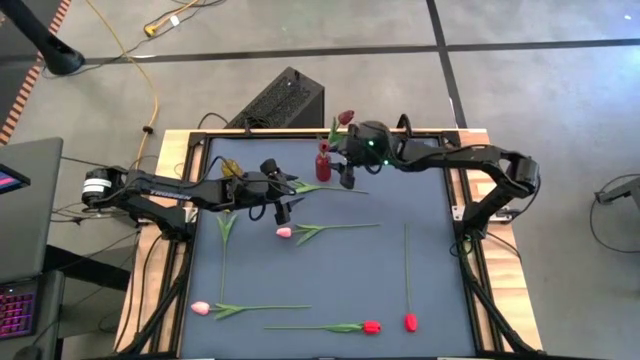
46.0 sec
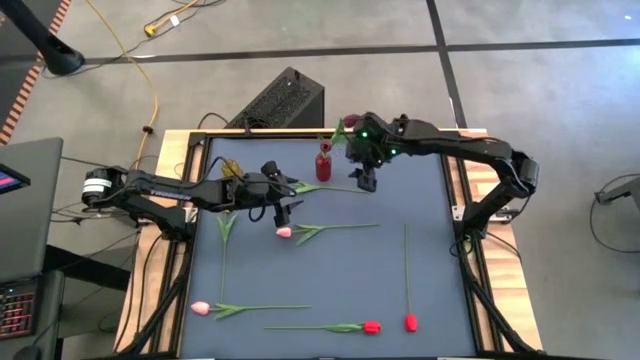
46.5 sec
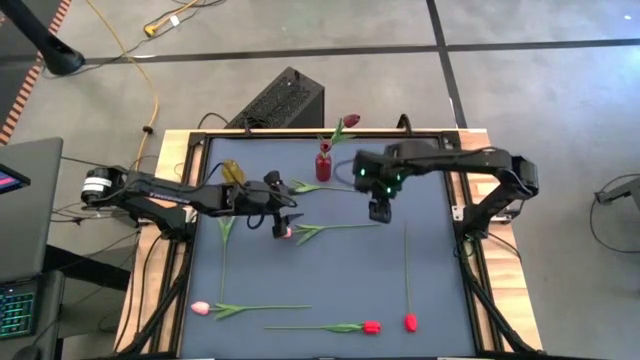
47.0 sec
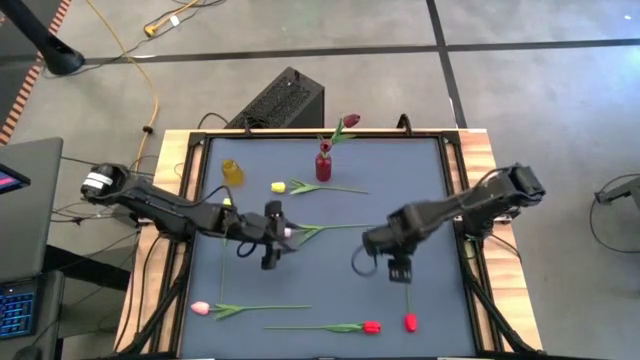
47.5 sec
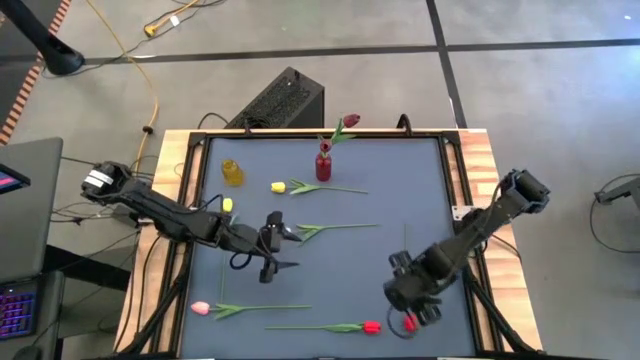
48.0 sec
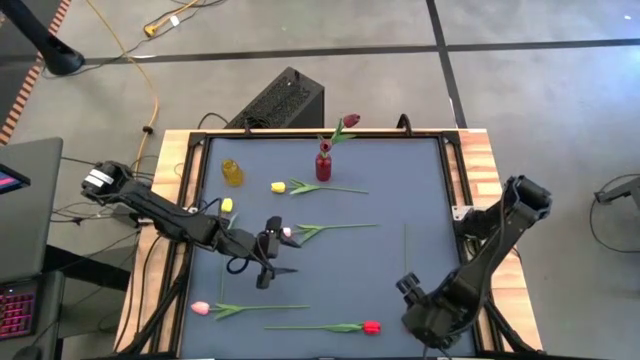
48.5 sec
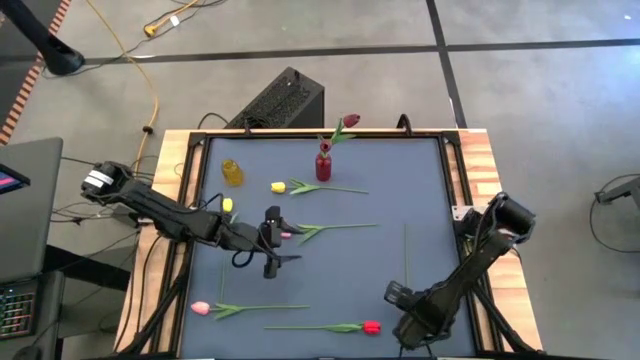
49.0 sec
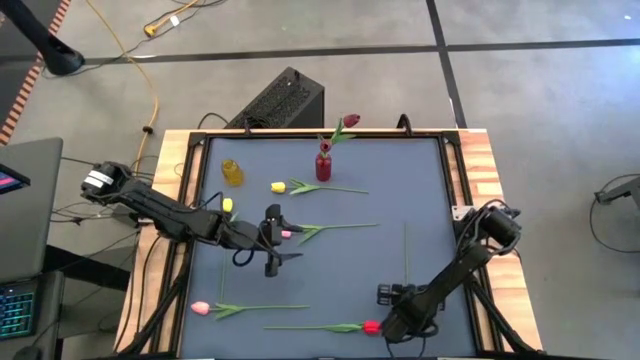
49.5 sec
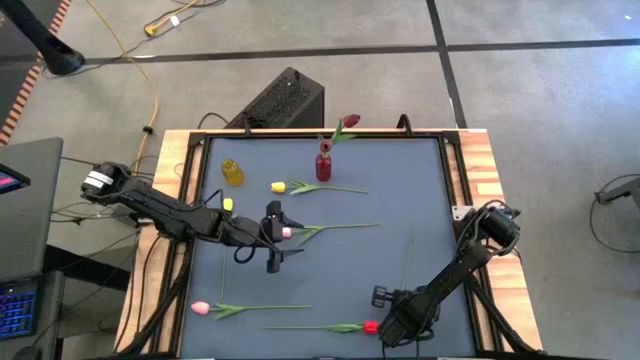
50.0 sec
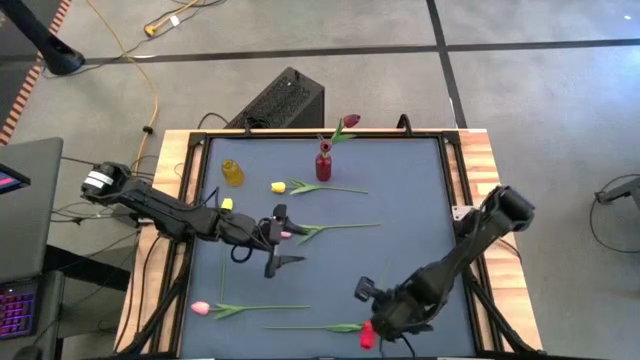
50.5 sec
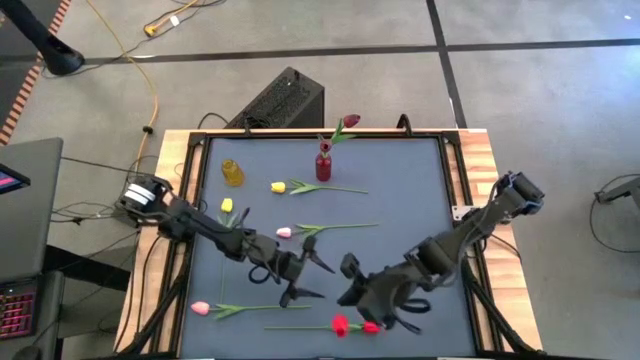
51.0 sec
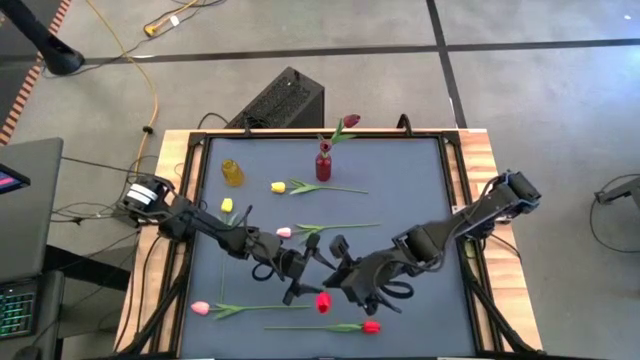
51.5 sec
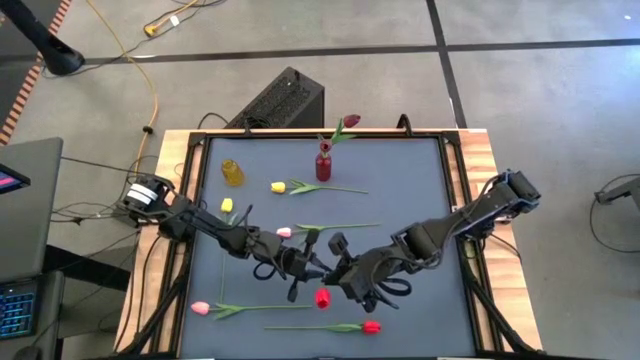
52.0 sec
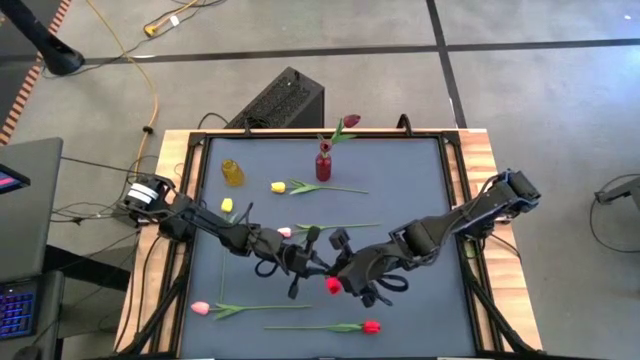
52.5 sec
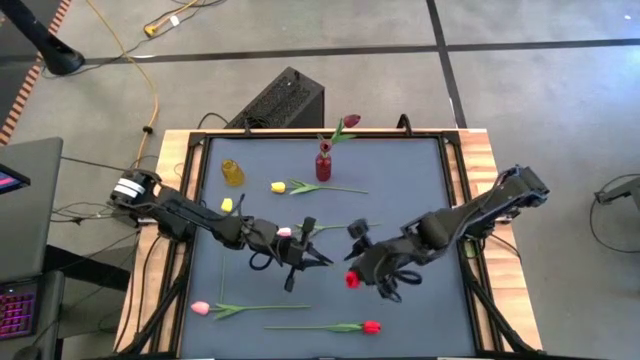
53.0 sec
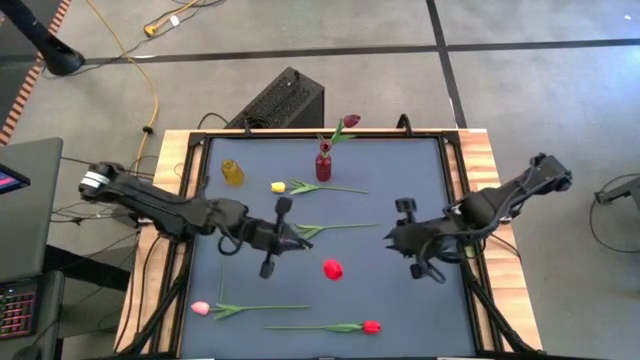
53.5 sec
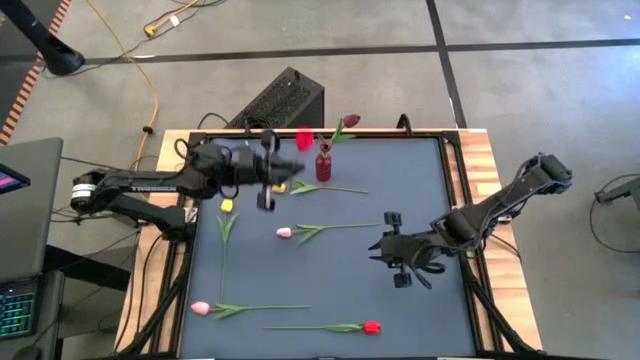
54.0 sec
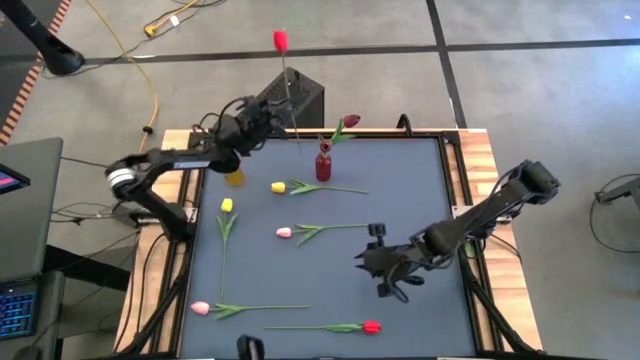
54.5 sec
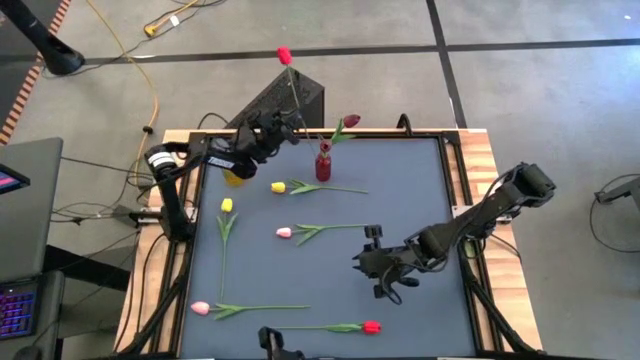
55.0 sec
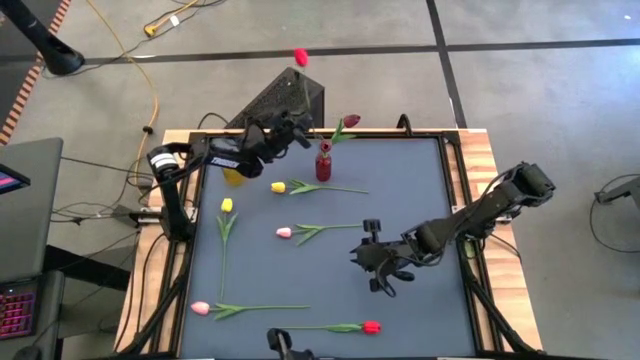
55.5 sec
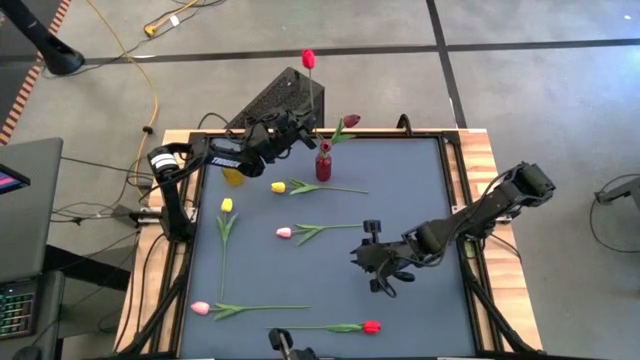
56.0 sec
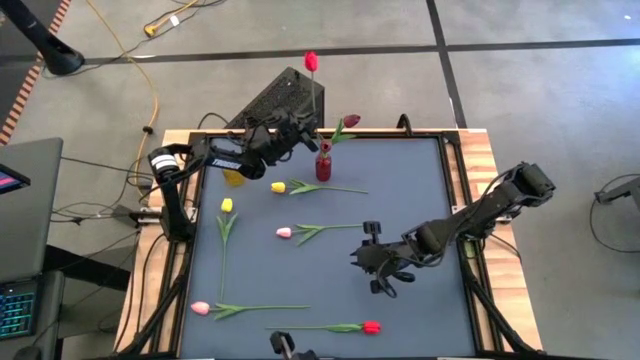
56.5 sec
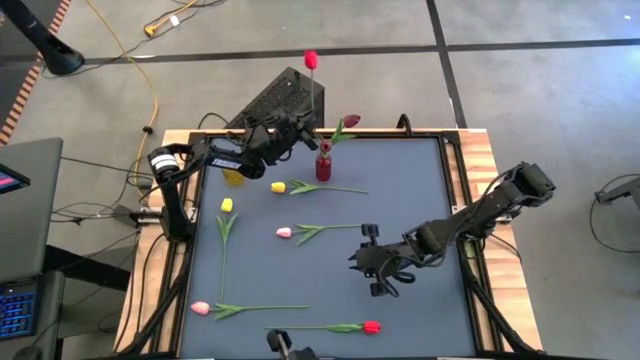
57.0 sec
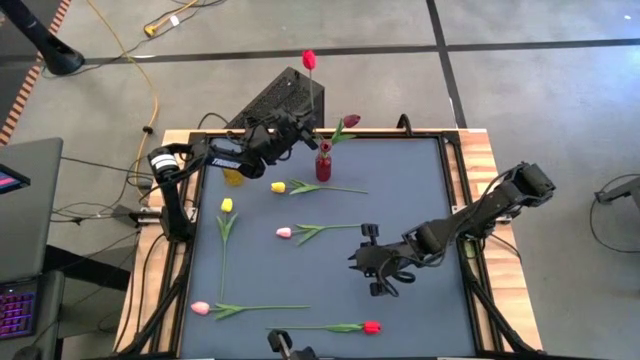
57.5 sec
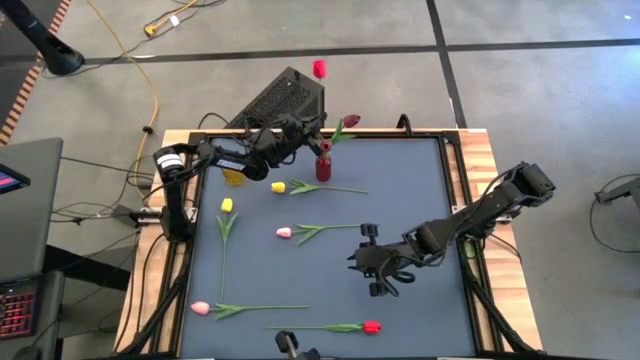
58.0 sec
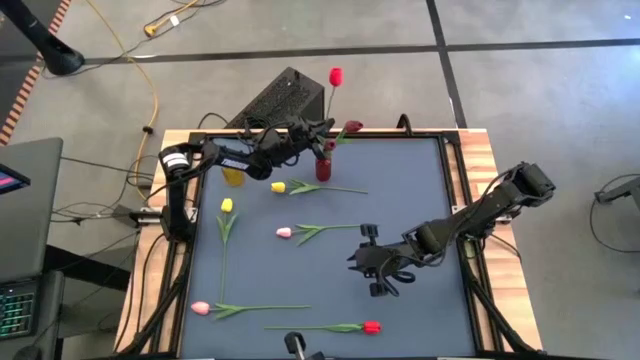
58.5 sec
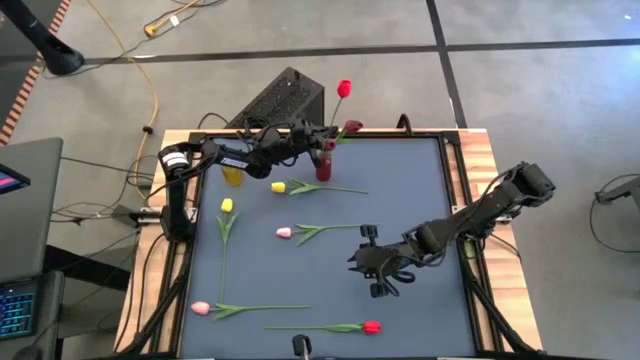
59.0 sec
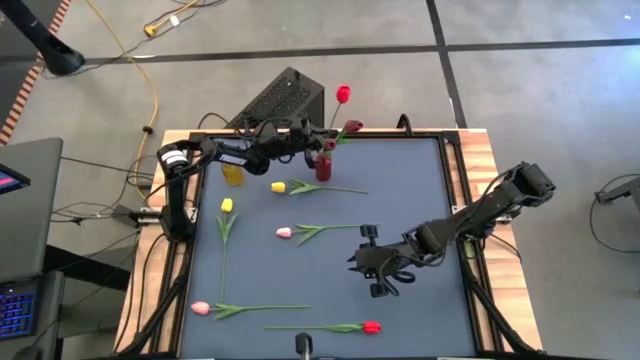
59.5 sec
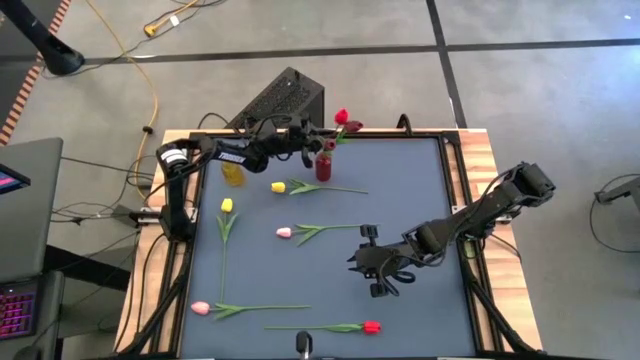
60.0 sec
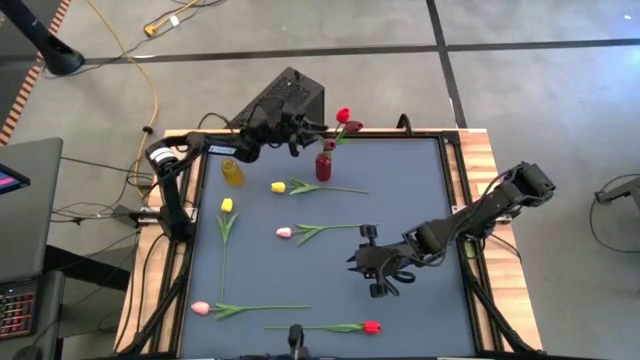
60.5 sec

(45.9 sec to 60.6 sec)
Task: Sort flowers into vase by color
Put the right red flower into the red flower vase

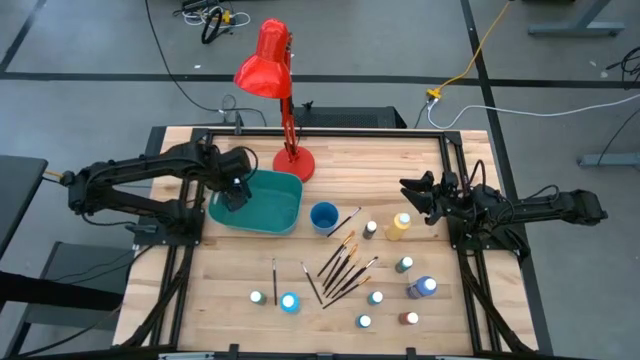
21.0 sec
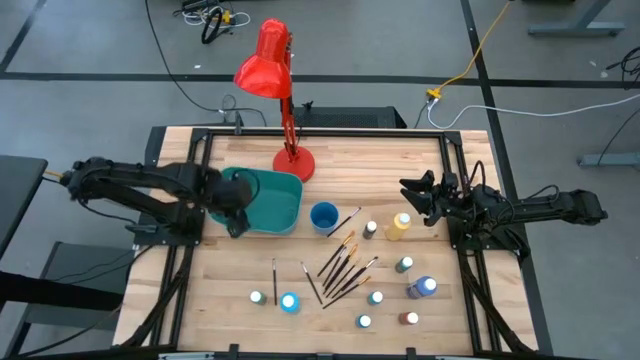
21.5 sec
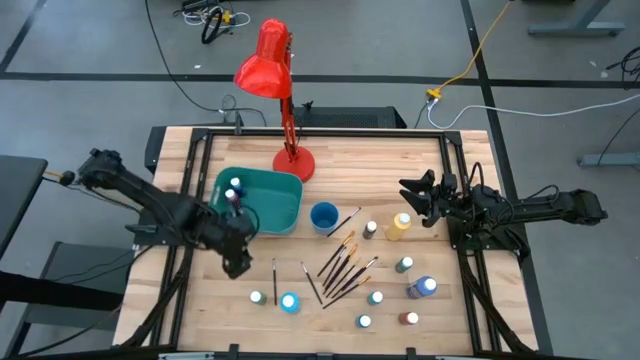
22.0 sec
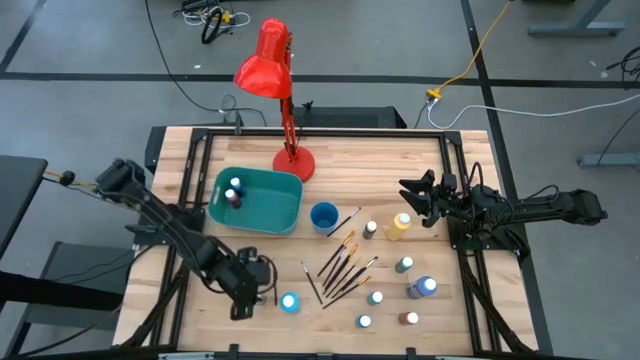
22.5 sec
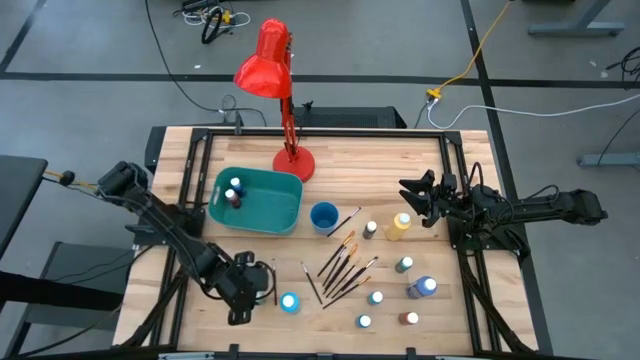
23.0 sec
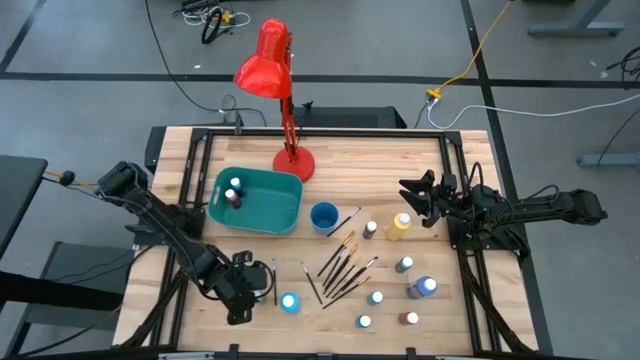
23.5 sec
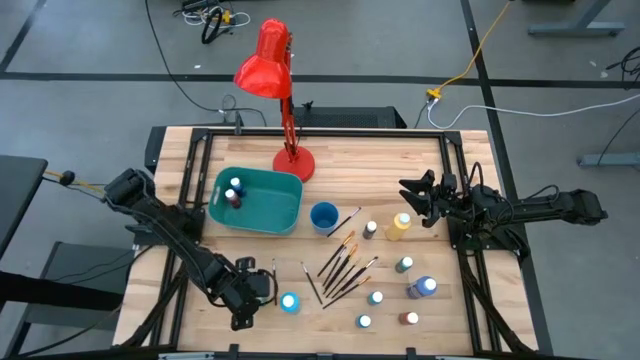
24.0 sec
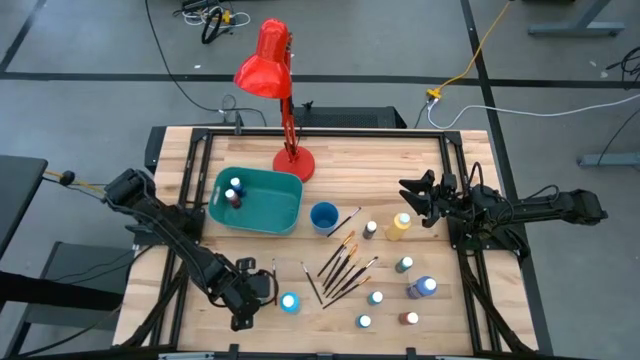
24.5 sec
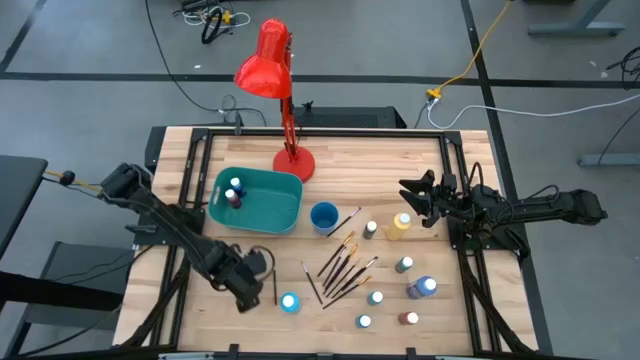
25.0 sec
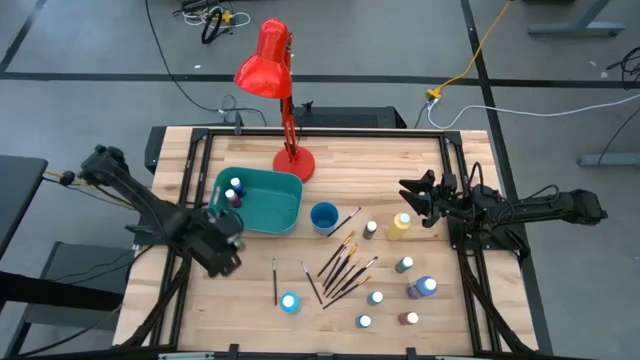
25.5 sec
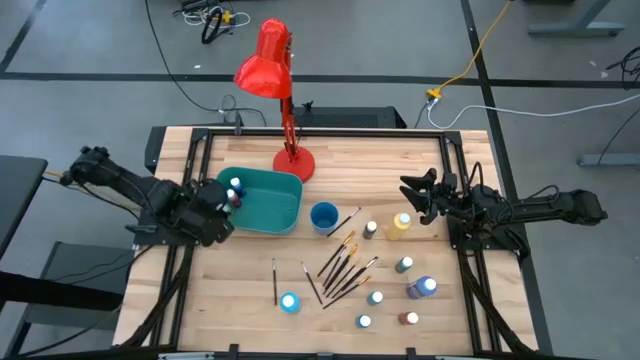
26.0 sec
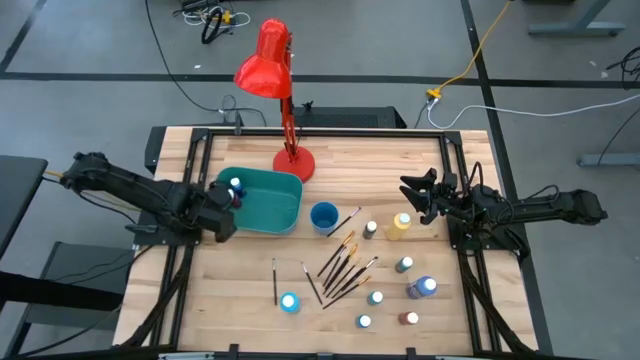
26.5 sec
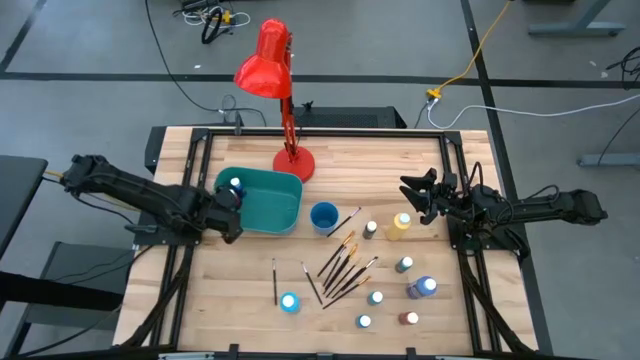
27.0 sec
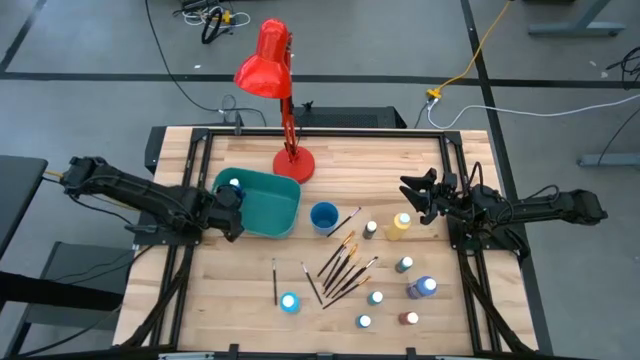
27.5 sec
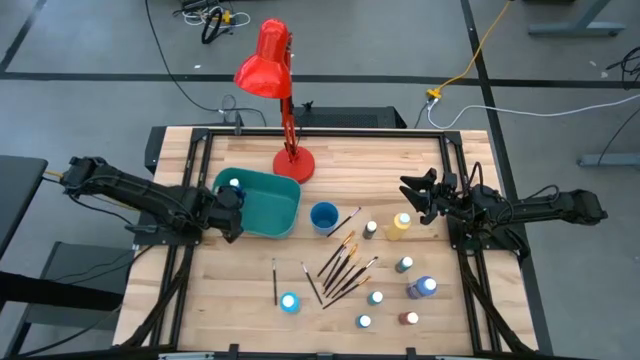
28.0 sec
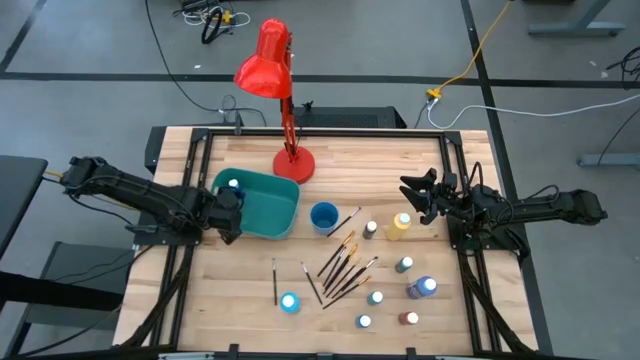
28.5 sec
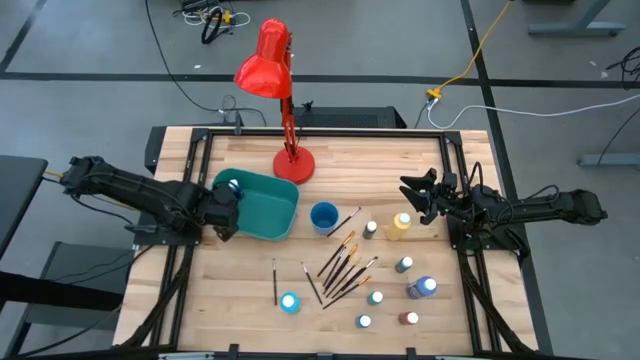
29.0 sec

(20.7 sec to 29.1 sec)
Task: Pick & Place Paint Supplies
Put the green paint bottle into the green bin
